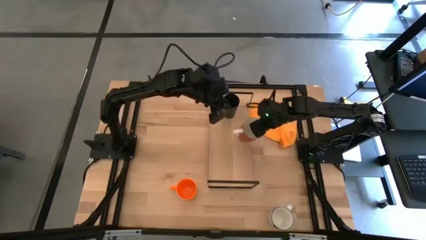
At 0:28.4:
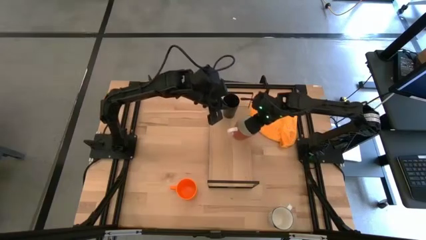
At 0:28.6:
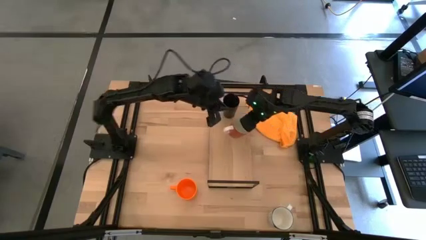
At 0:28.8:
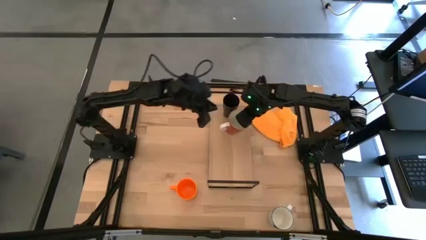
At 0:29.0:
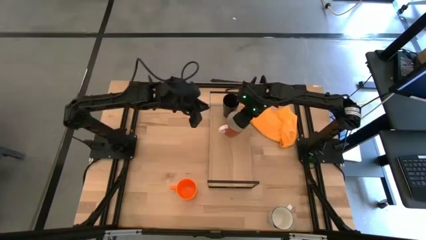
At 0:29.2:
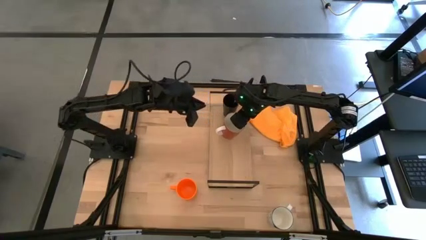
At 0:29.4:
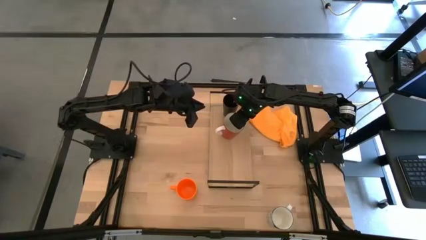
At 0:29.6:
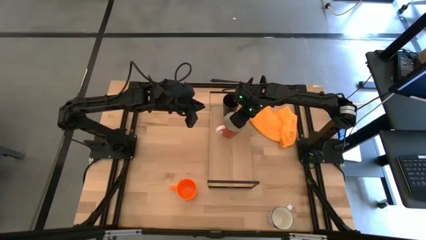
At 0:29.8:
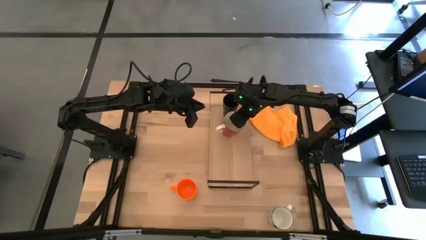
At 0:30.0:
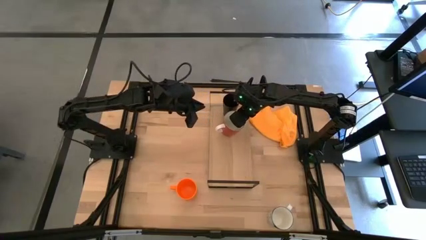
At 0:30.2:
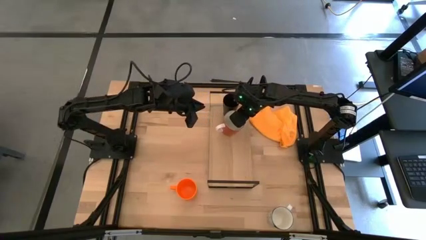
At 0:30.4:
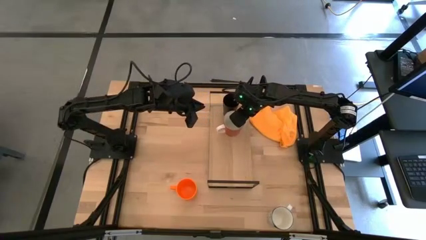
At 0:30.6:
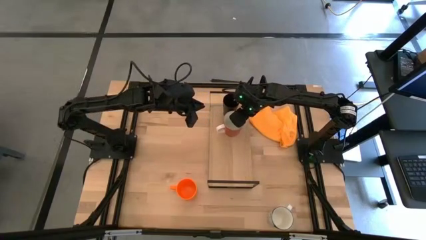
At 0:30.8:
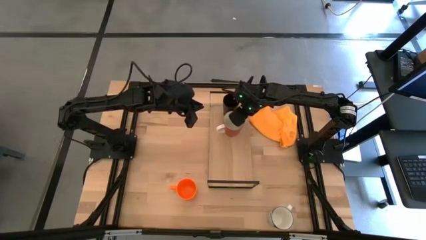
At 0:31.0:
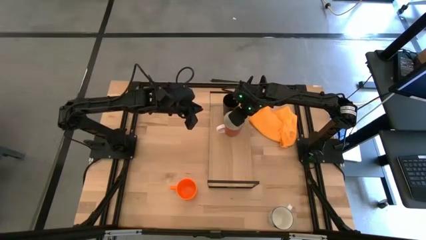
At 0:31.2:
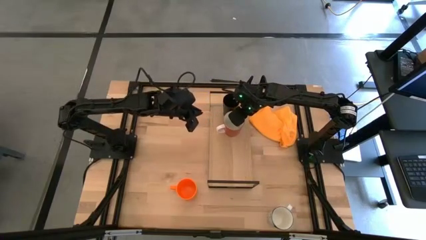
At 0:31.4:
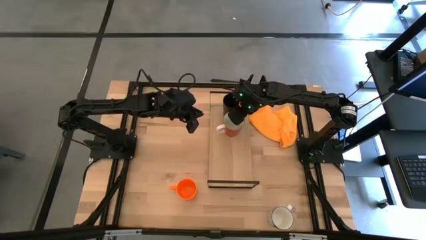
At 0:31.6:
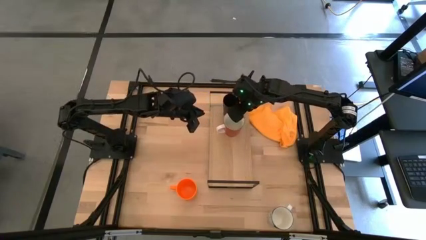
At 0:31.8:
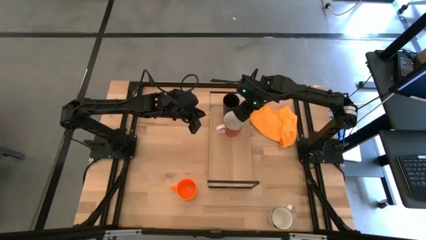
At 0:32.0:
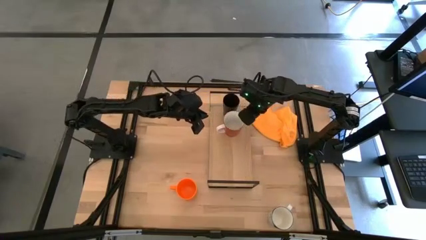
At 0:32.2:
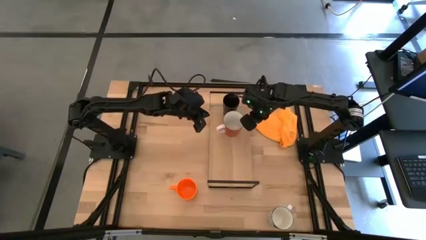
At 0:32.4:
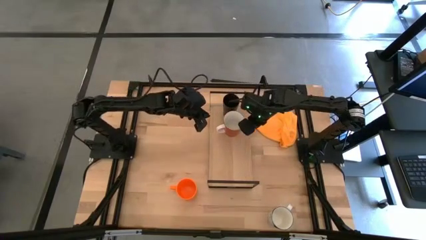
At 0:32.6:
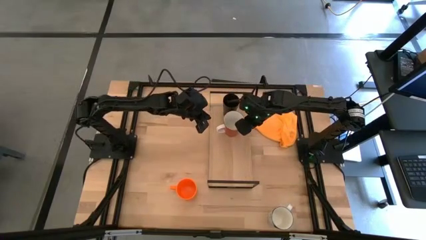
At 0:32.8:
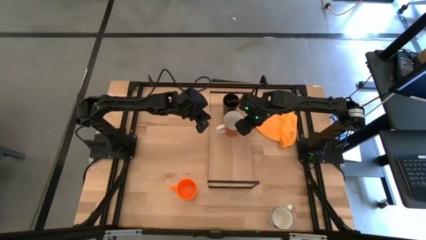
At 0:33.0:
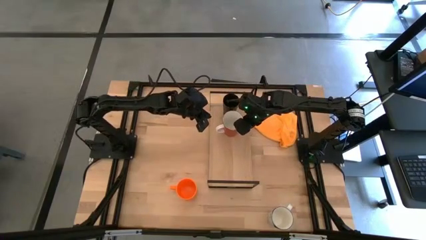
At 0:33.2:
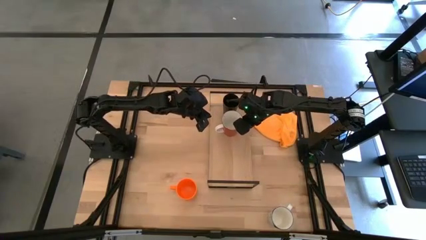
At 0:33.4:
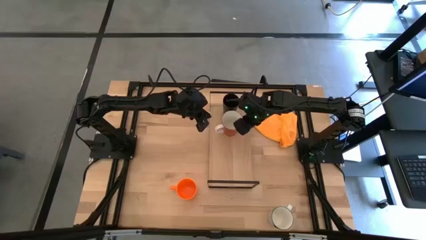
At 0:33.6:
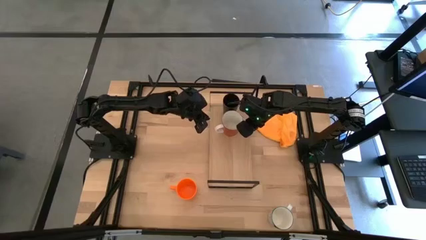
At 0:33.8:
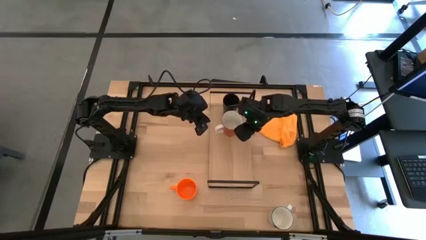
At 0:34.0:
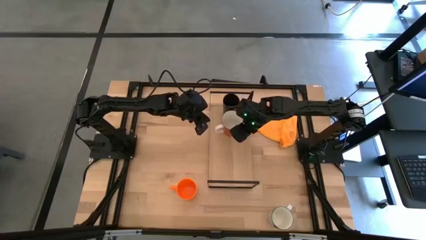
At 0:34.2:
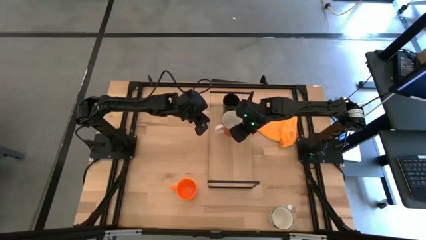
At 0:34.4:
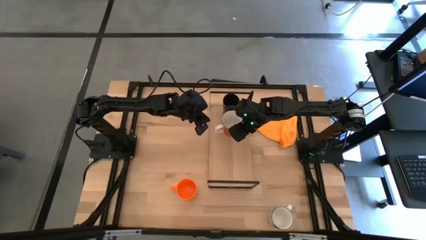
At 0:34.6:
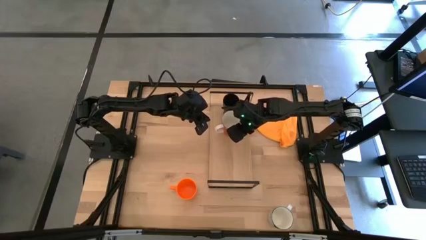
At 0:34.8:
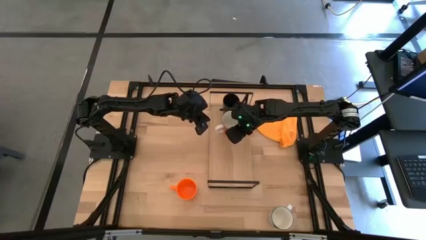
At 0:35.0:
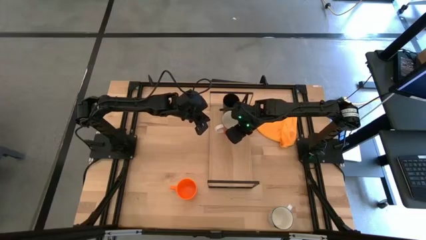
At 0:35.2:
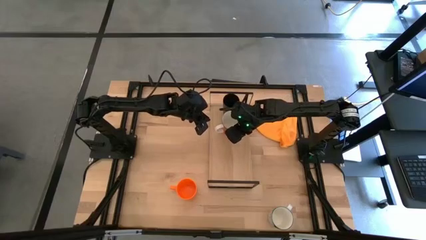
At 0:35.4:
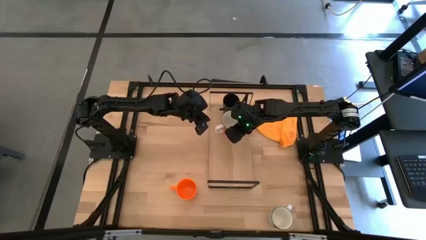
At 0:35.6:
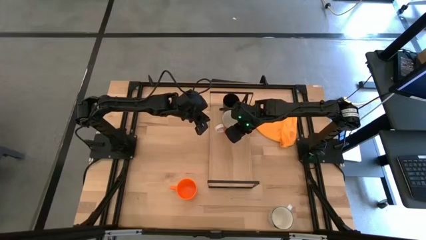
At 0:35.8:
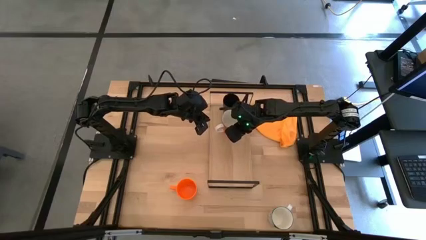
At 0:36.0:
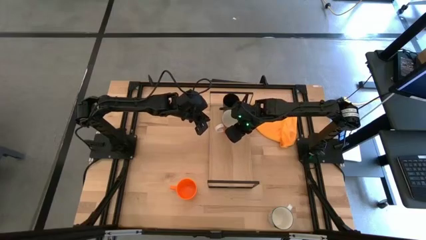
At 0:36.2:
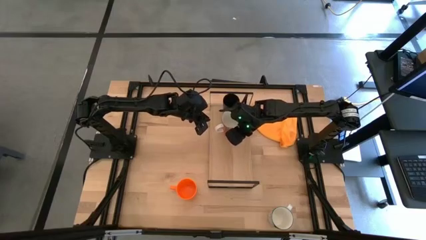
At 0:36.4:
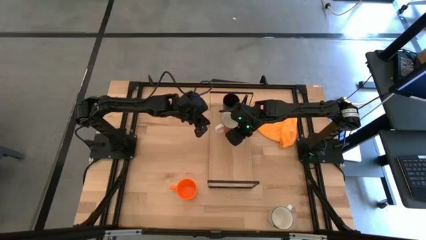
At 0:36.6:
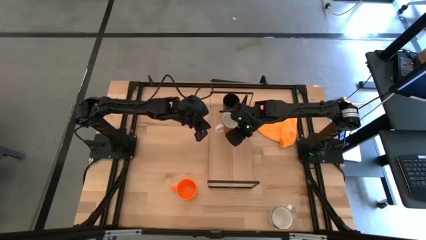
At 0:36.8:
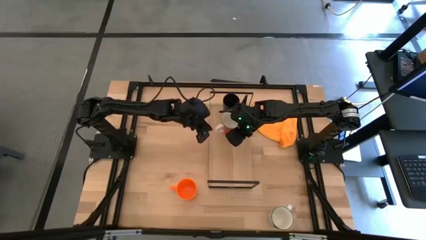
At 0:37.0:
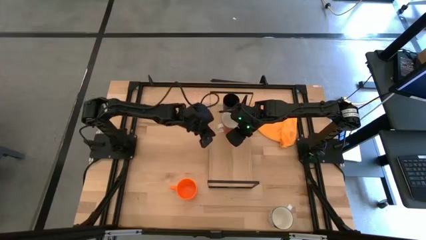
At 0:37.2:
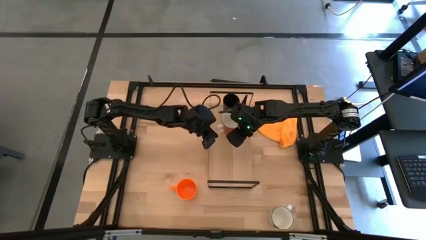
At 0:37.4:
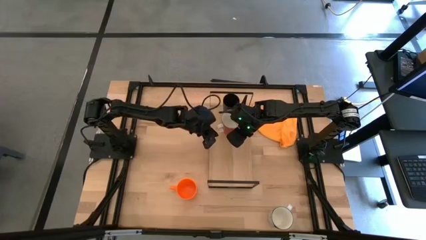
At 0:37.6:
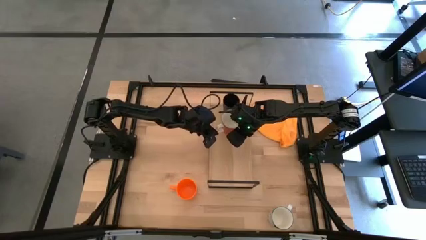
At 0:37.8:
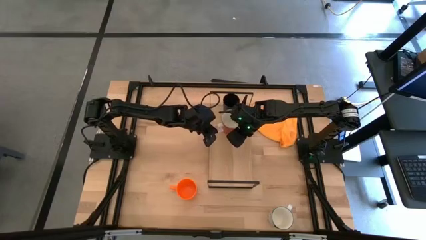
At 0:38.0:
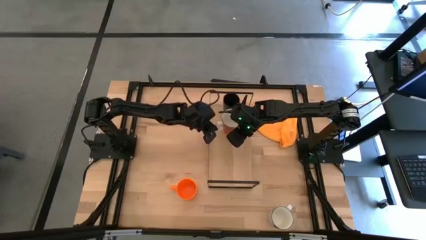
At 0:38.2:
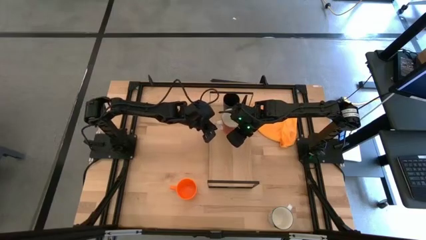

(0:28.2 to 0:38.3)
Task: Stack small to large cups/mugs on shelf
Put the red pattern mug align with the black cup on the shelf

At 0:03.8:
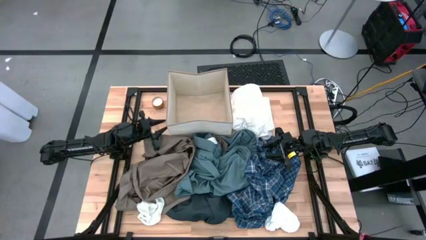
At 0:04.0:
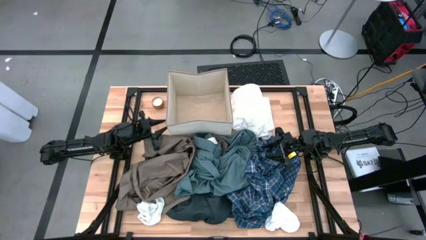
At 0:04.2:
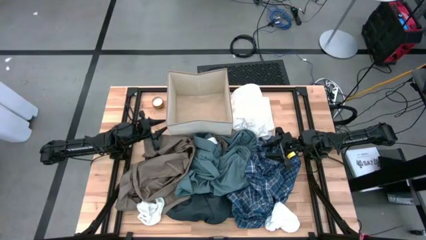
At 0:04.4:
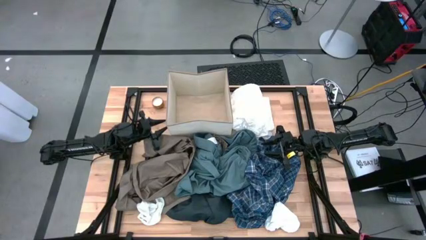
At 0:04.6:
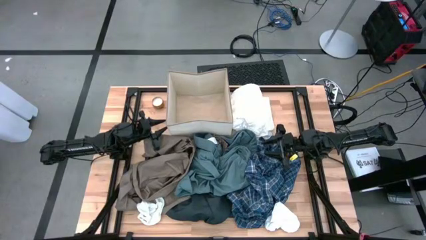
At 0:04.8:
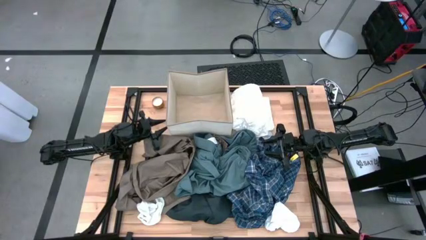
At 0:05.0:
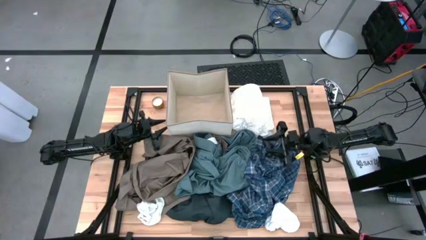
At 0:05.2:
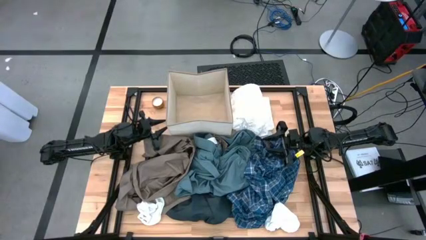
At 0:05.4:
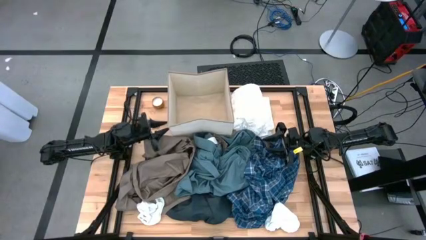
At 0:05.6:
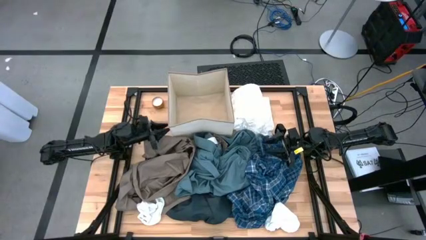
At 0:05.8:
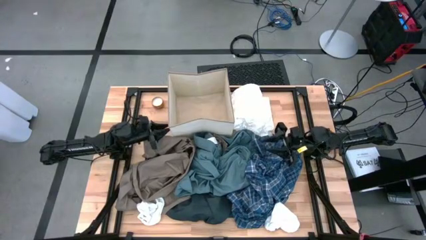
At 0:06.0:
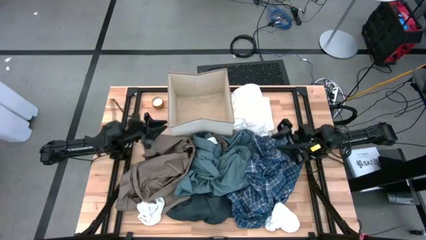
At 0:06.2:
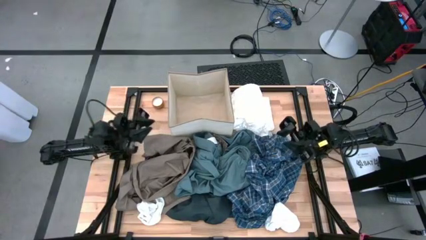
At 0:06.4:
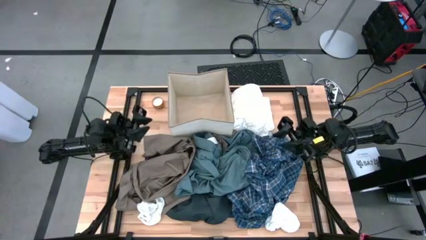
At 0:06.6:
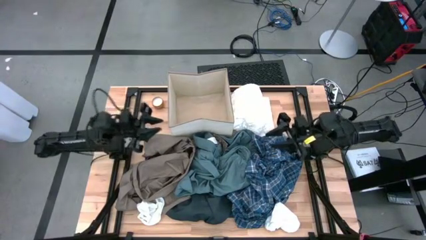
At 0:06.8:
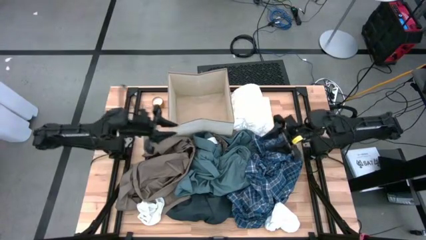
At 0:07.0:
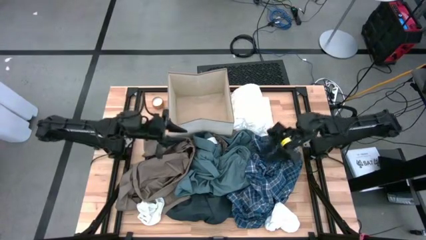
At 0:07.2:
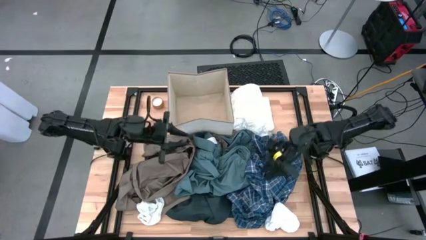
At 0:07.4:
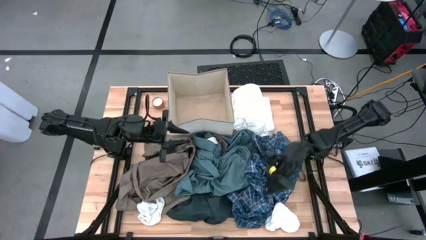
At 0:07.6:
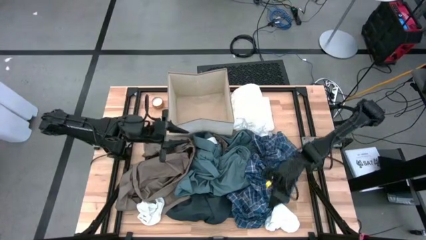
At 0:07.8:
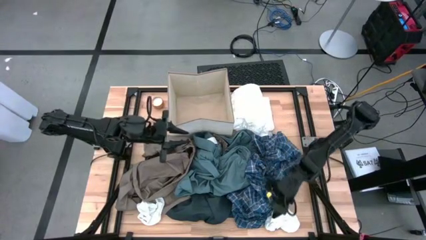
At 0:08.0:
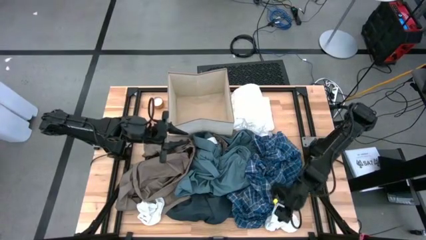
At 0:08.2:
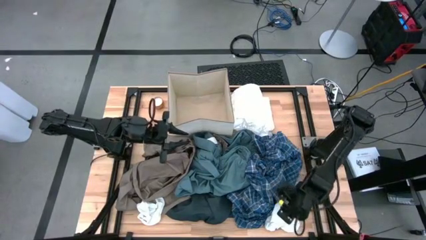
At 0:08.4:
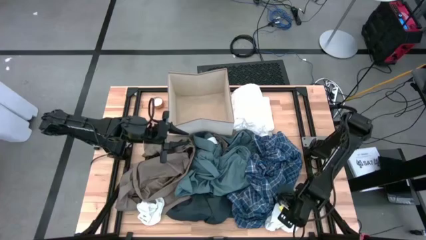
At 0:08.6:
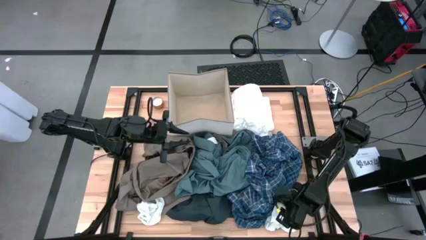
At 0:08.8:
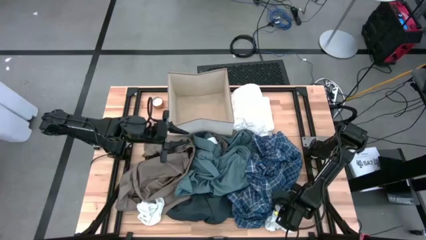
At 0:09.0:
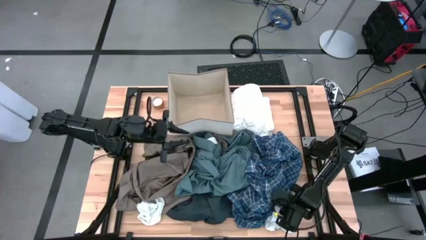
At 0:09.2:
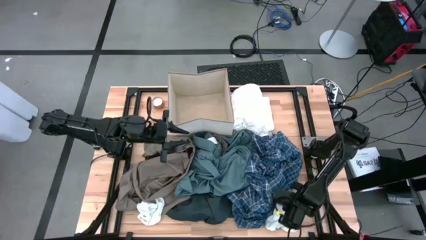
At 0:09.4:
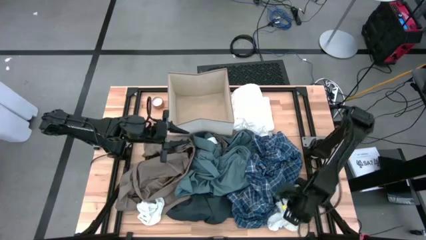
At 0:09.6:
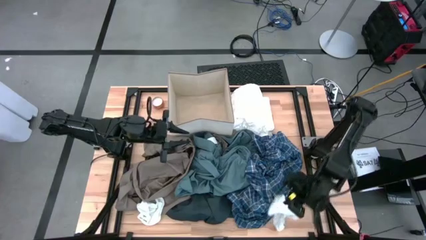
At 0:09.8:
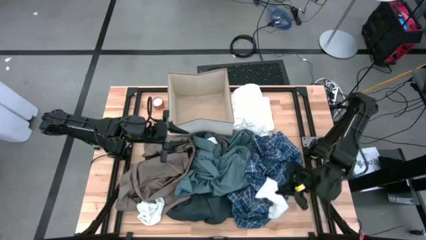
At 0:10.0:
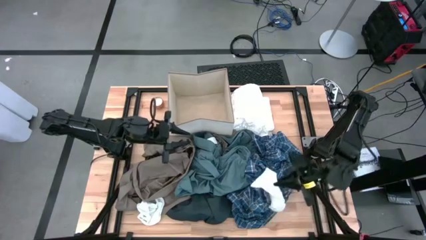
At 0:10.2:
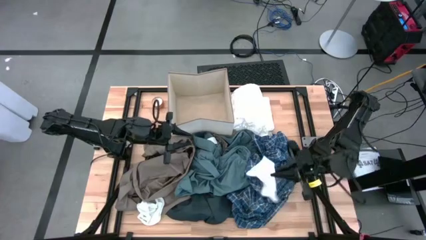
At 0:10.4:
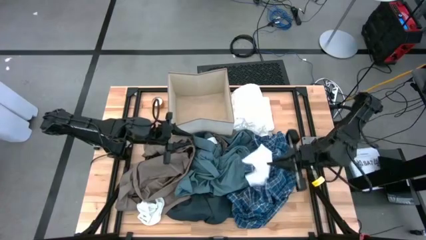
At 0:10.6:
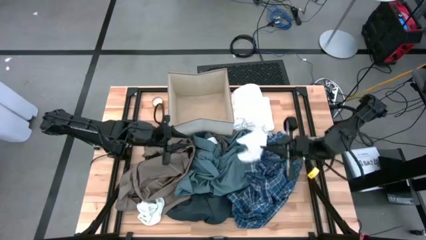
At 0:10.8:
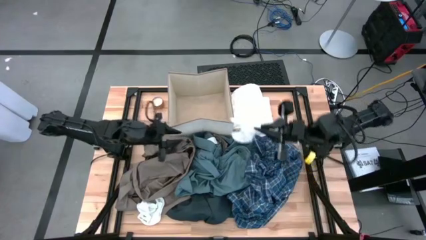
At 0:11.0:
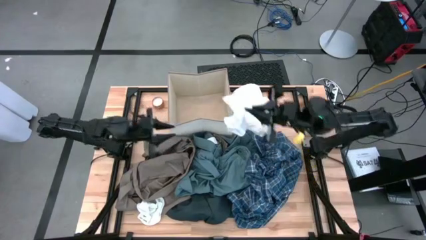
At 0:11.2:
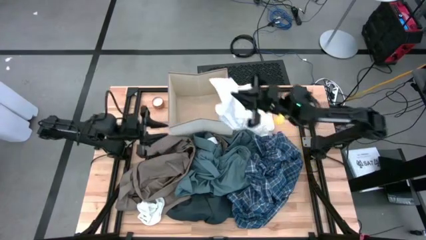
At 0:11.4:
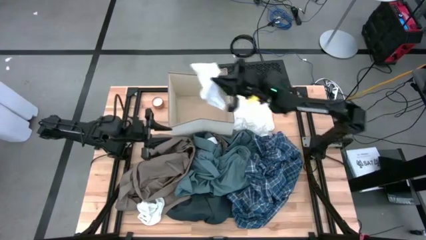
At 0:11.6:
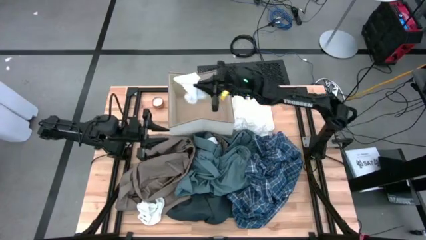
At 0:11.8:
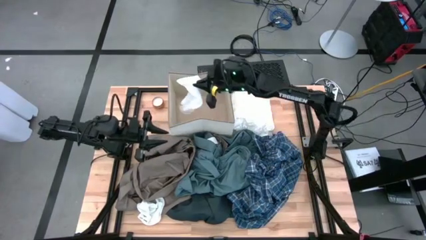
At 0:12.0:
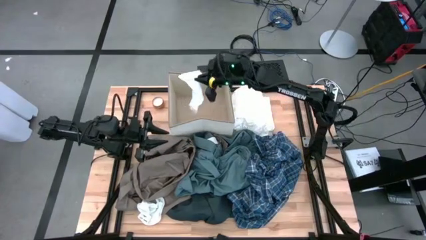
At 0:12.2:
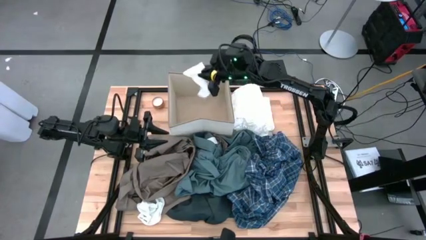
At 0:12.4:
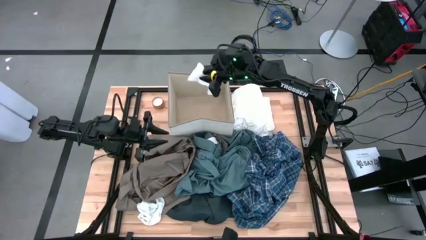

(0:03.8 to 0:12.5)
Task: Sort clothes
Put the right white sock into the laundry bin
